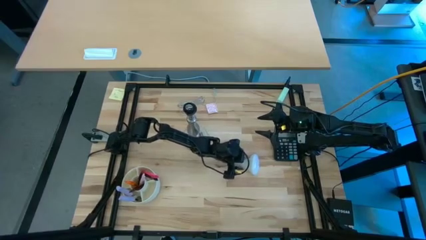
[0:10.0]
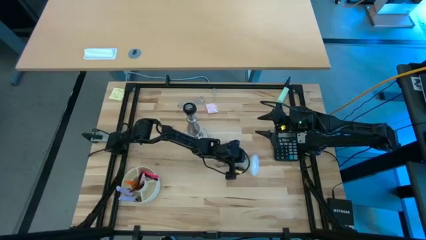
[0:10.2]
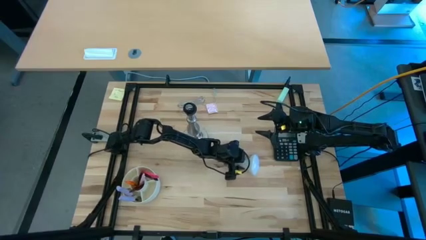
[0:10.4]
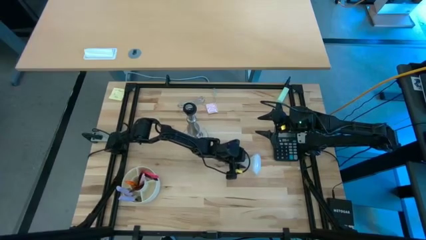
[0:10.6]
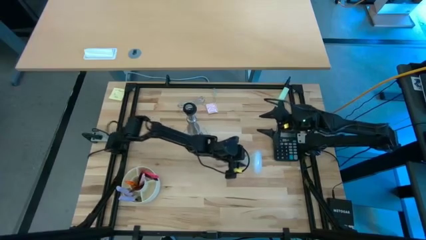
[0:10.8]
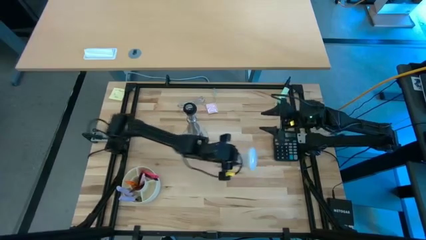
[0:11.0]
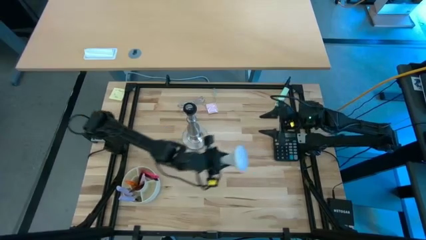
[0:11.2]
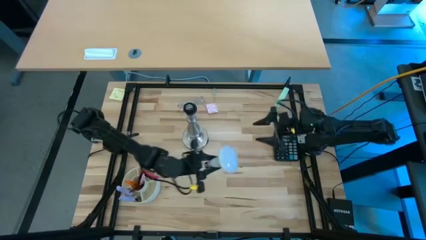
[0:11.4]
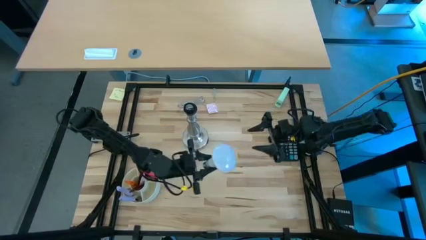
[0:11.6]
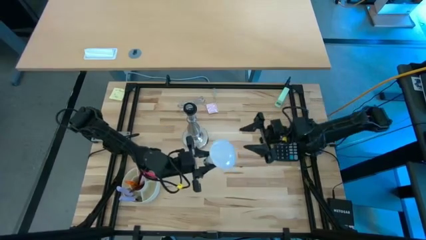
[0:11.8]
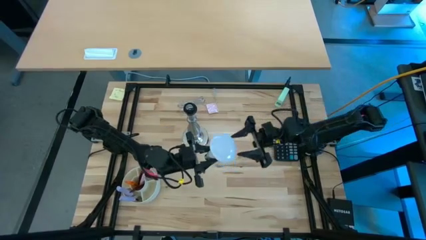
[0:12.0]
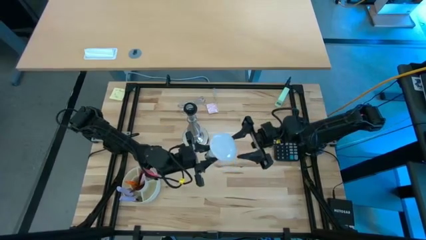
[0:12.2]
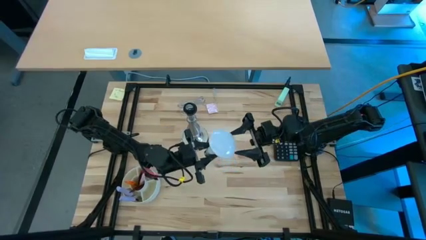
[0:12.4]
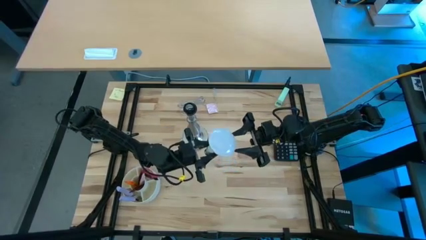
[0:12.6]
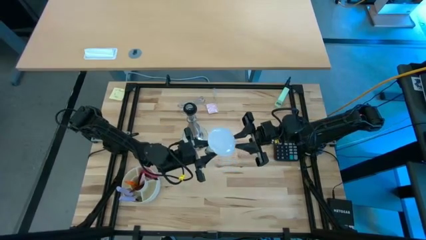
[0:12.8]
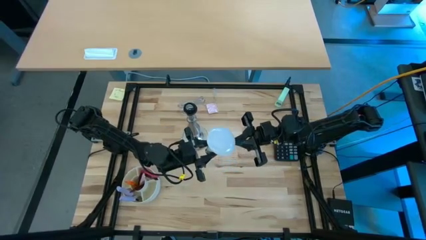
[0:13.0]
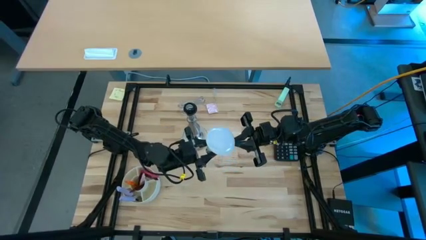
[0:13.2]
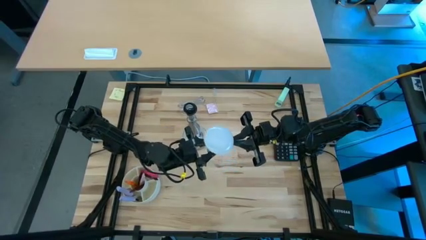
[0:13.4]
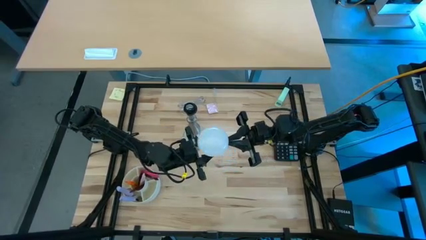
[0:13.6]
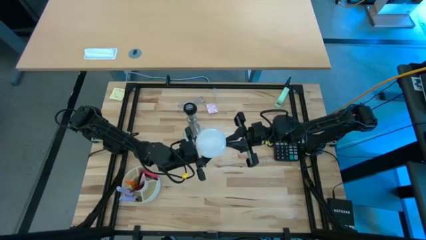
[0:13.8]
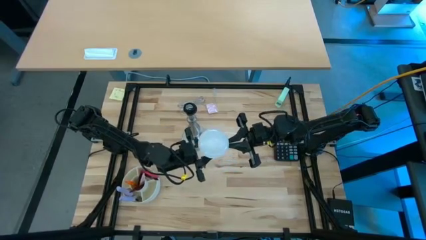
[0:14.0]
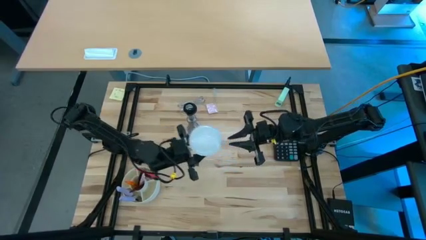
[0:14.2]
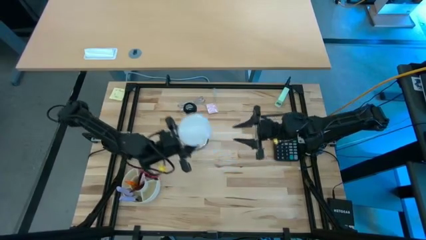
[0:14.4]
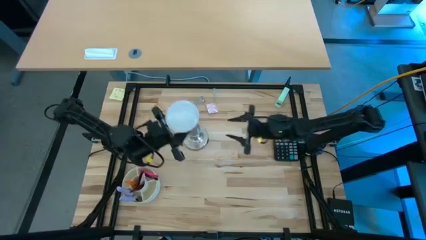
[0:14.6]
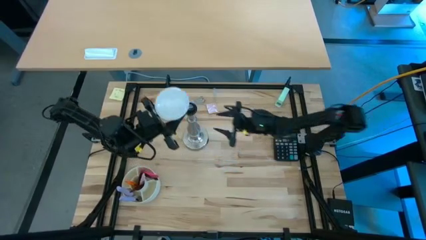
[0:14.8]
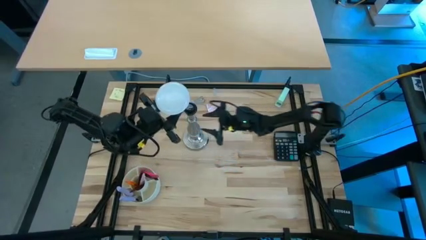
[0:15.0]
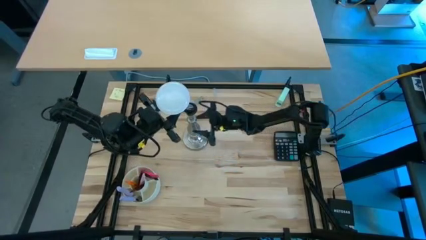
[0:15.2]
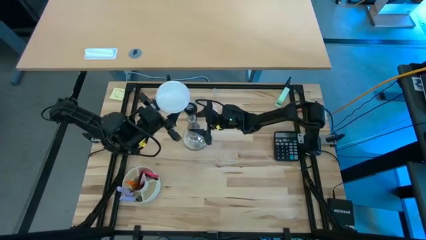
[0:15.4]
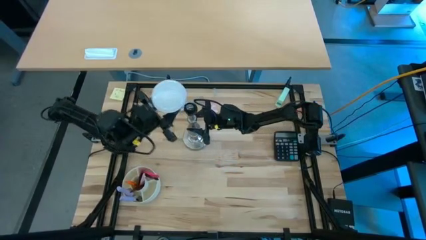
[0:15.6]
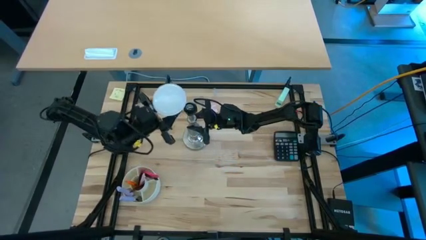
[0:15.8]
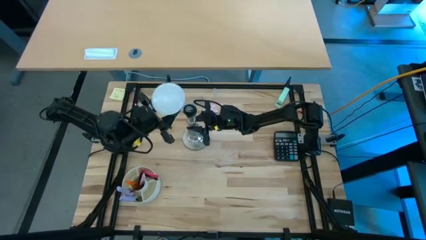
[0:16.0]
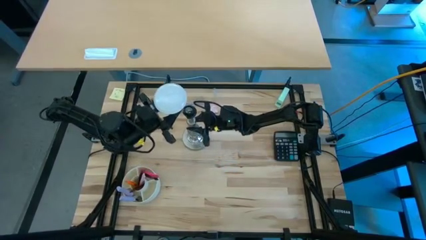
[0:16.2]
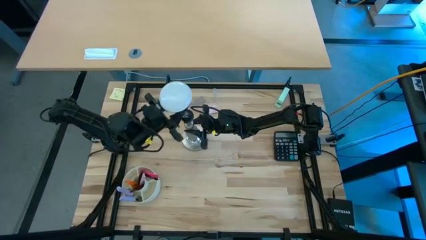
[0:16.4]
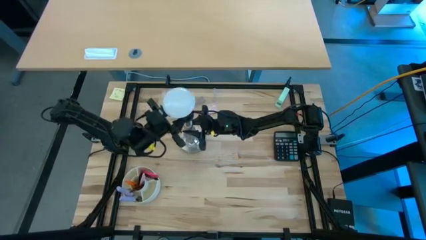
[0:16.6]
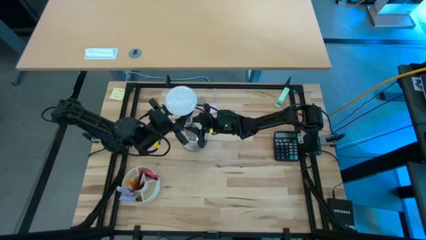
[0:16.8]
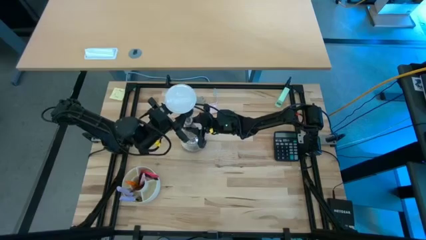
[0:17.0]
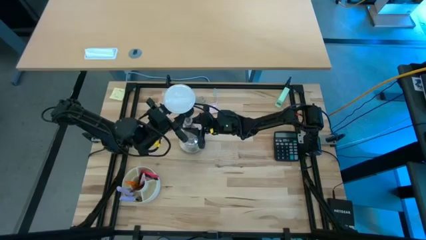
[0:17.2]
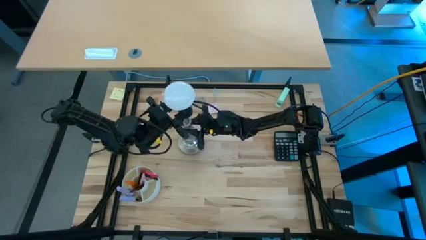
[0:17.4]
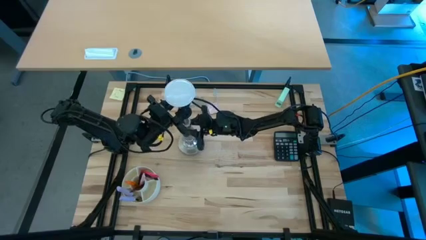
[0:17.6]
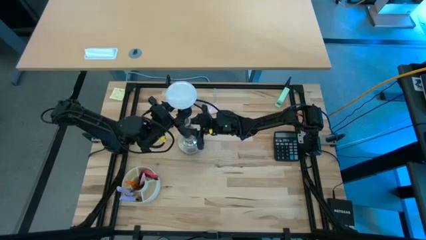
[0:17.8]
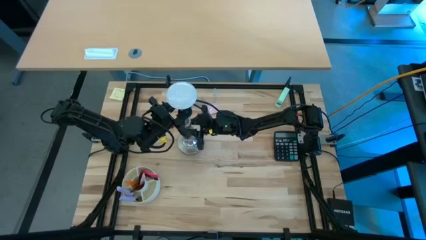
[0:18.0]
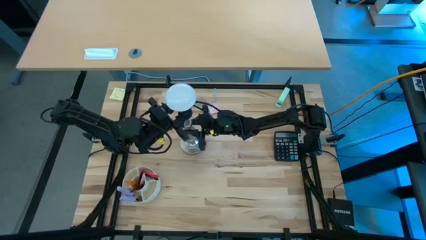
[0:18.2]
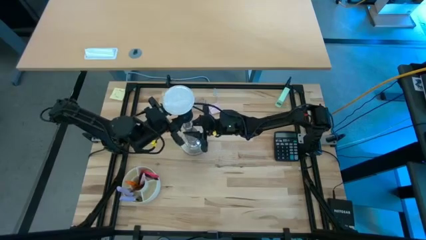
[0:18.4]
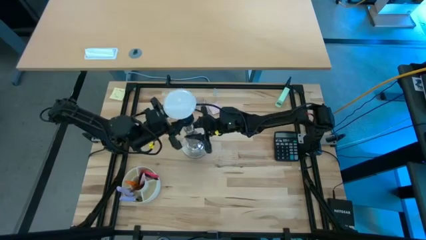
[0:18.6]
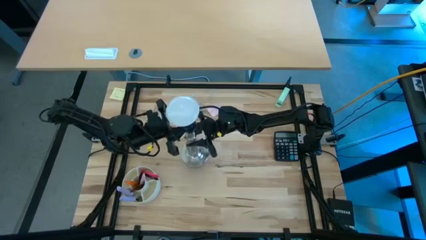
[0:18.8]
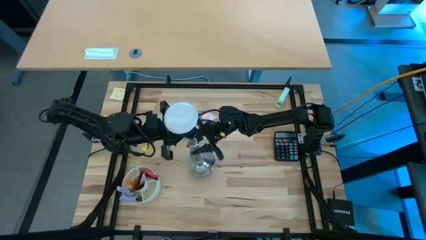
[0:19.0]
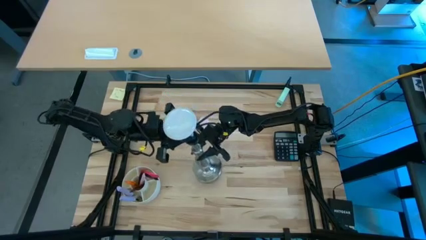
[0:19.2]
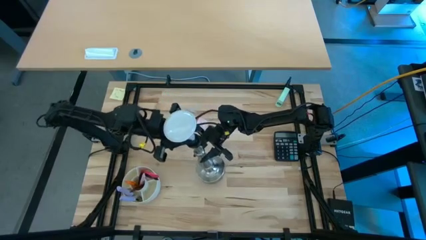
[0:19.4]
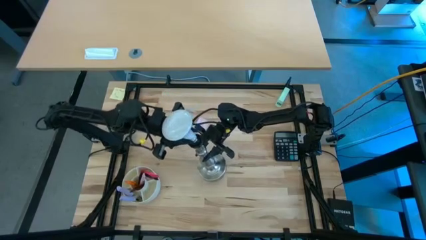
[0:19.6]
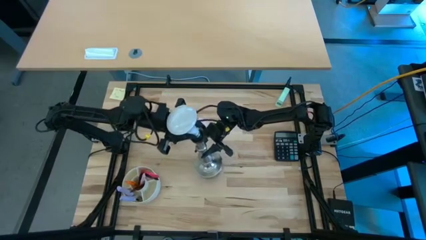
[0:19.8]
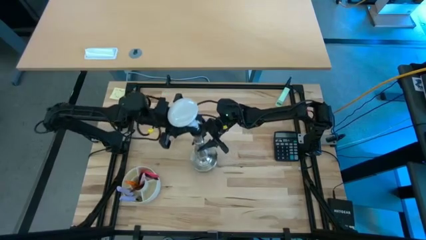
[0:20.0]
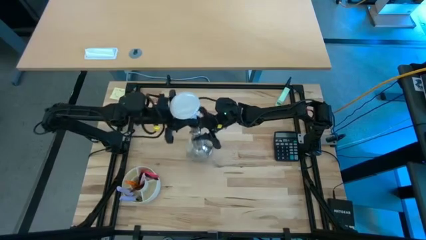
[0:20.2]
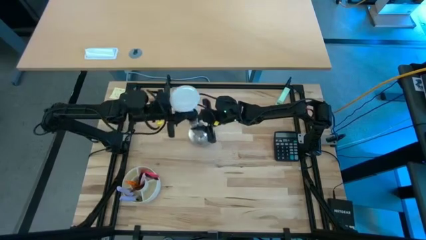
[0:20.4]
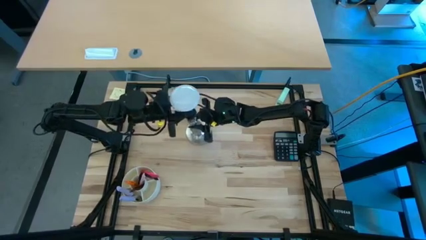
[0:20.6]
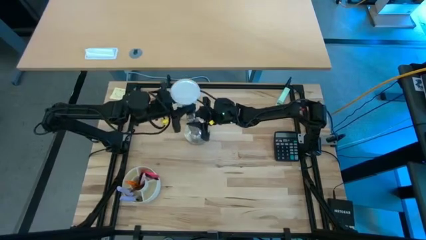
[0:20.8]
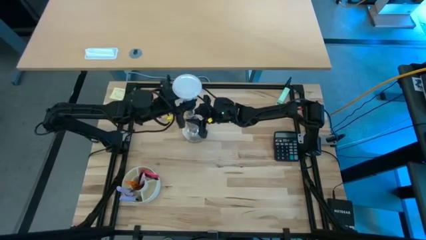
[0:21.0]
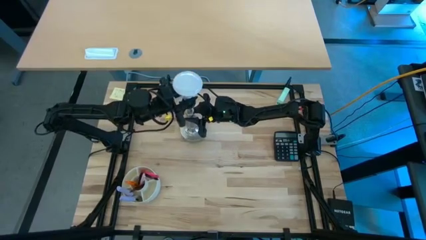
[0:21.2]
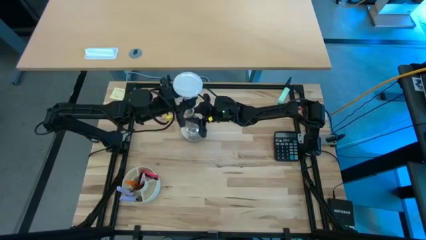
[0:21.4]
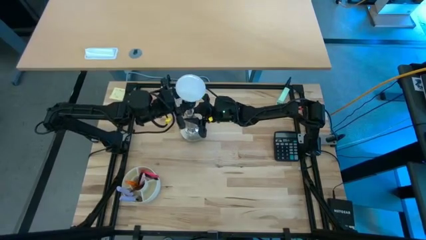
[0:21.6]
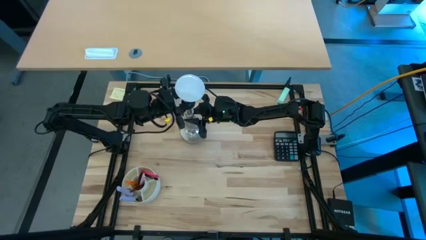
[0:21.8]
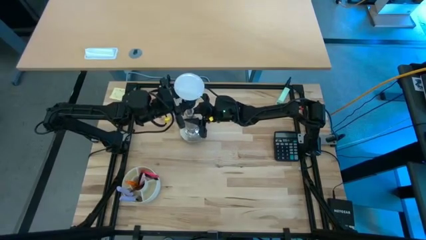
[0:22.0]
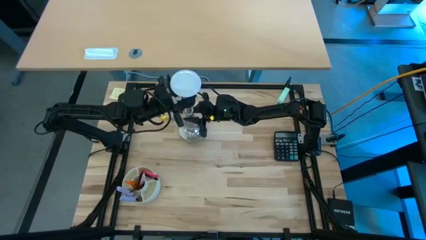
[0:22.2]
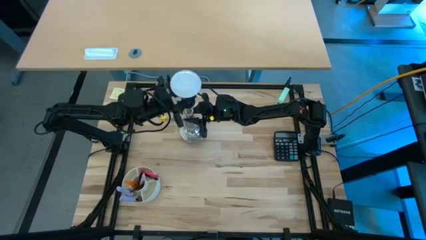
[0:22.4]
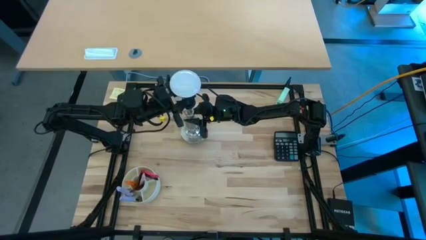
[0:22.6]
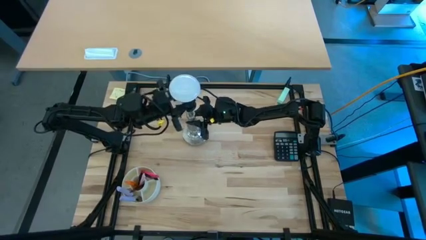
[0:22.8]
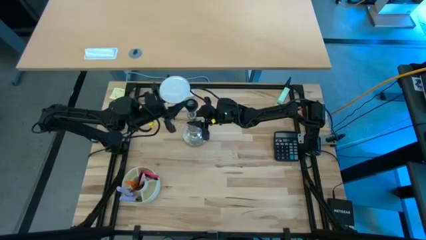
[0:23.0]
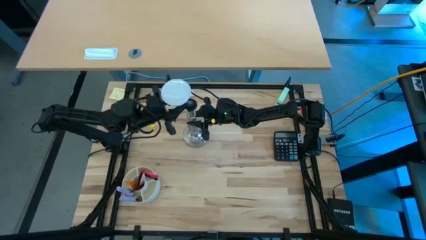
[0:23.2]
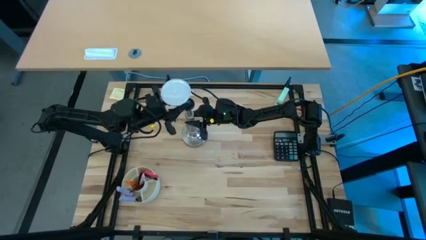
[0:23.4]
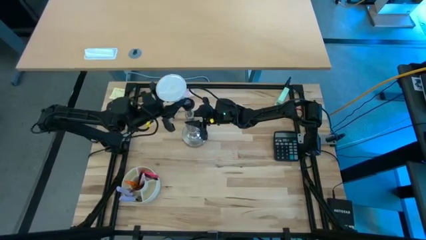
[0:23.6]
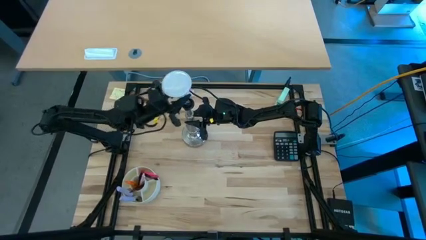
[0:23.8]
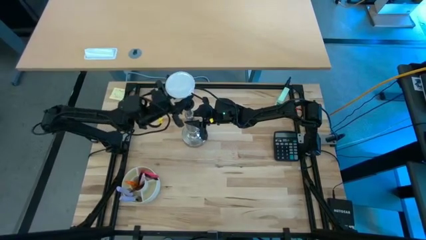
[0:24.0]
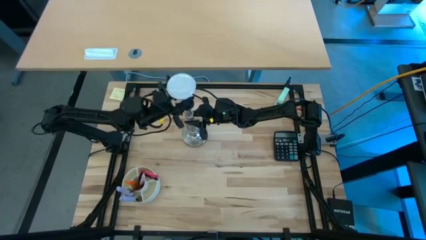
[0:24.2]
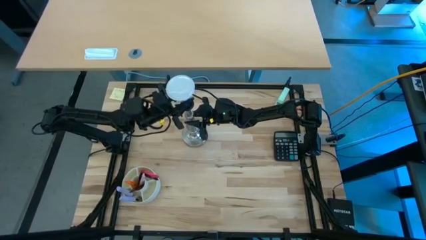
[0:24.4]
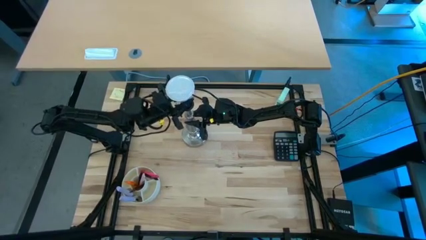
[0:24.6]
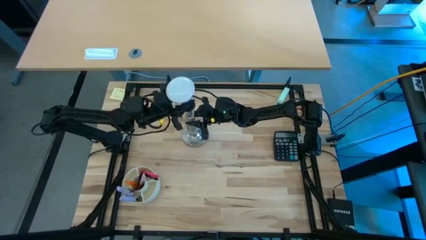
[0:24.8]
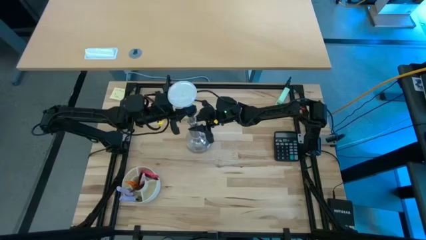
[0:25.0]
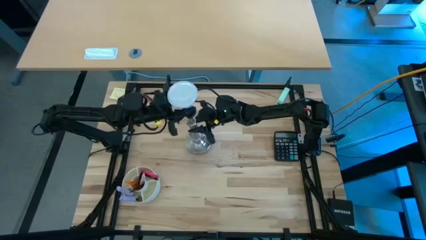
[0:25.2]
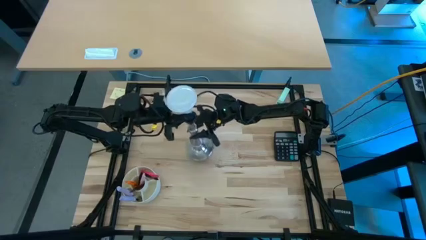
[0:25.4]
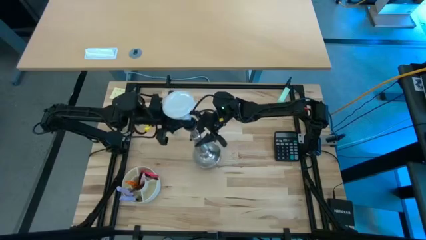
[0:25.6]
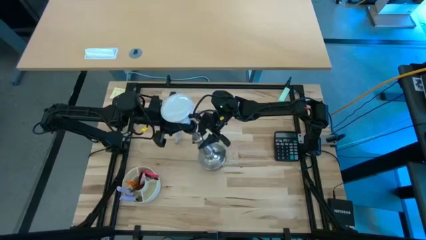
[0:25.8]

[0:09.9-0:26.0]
Task: Screw lightbulb
Insert the white lightbulb on the silver lamp
